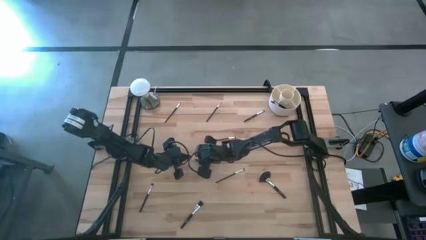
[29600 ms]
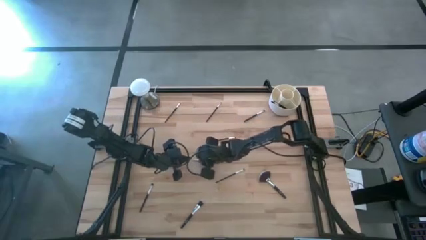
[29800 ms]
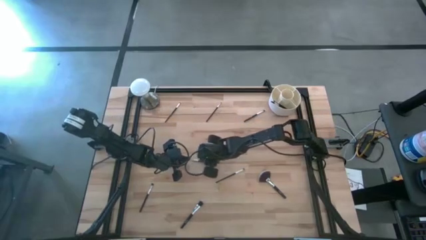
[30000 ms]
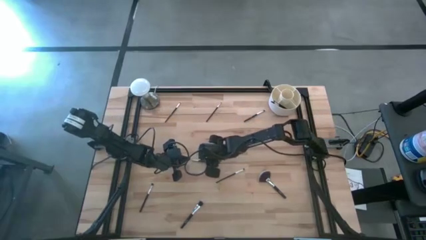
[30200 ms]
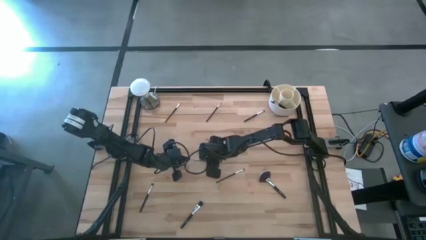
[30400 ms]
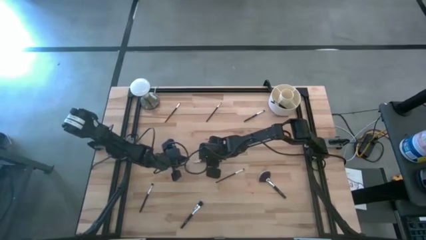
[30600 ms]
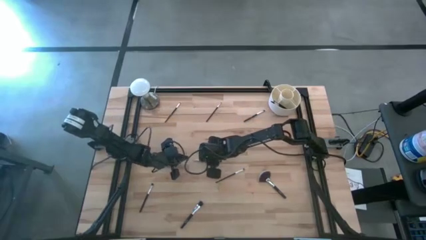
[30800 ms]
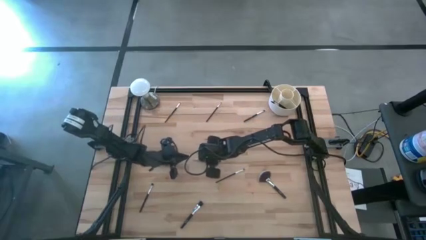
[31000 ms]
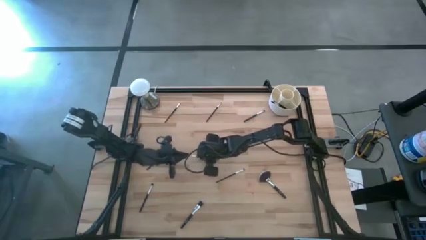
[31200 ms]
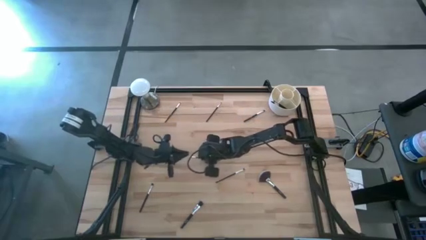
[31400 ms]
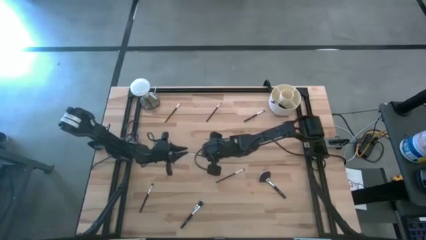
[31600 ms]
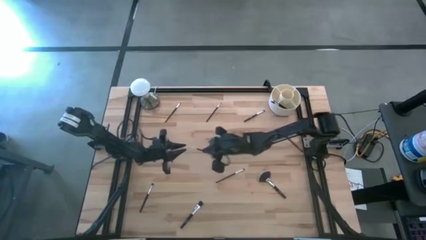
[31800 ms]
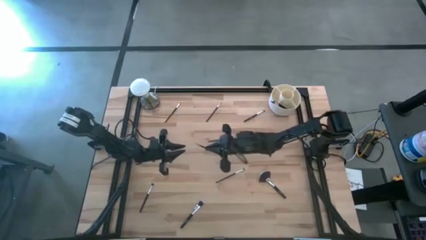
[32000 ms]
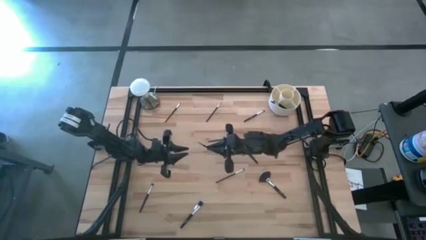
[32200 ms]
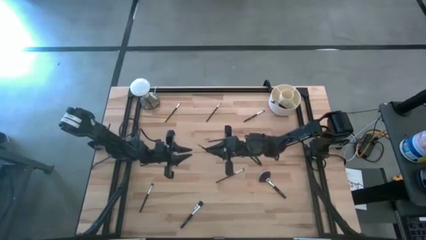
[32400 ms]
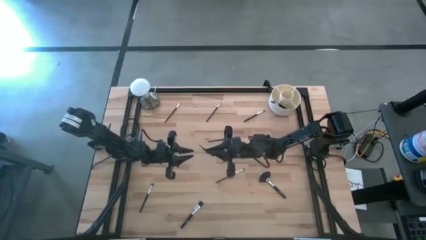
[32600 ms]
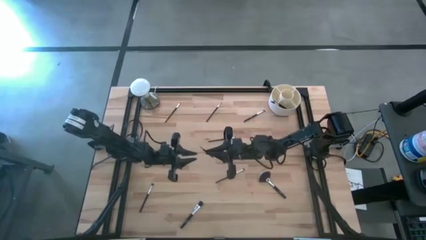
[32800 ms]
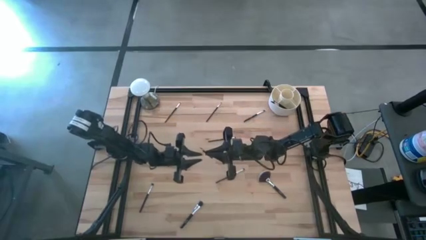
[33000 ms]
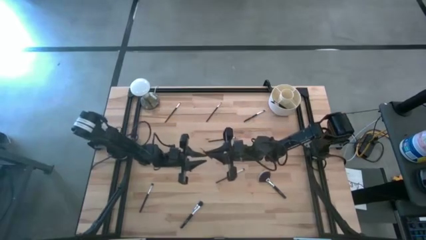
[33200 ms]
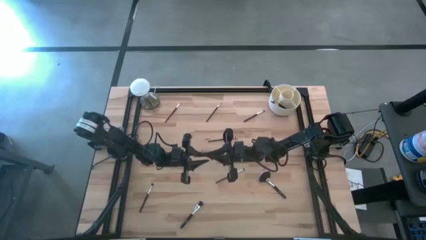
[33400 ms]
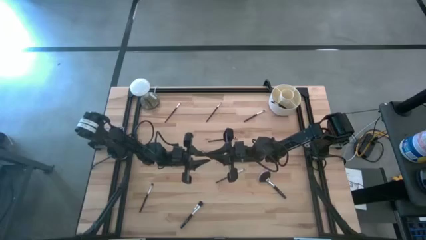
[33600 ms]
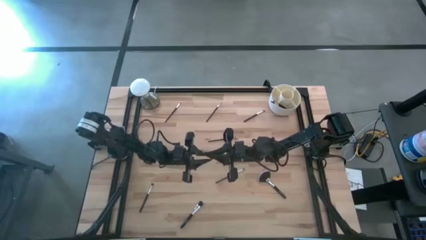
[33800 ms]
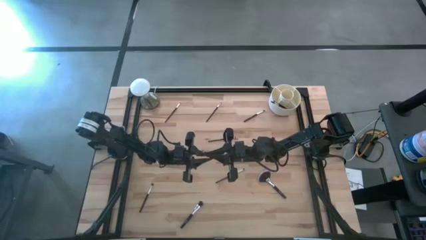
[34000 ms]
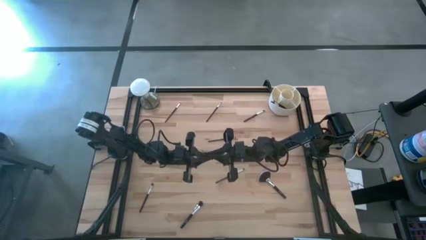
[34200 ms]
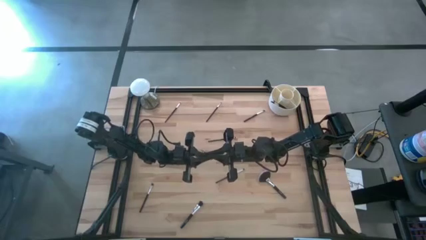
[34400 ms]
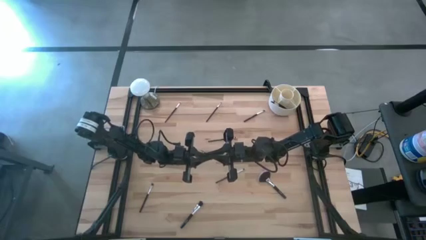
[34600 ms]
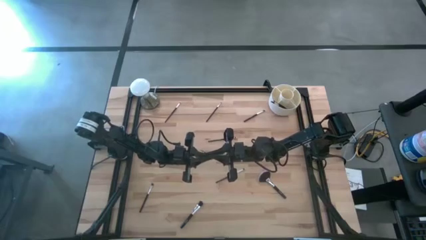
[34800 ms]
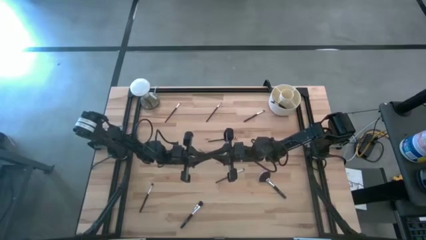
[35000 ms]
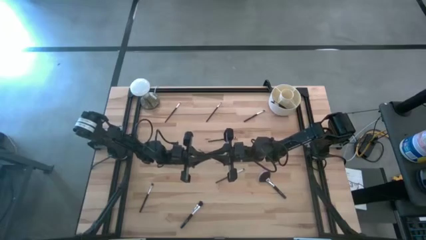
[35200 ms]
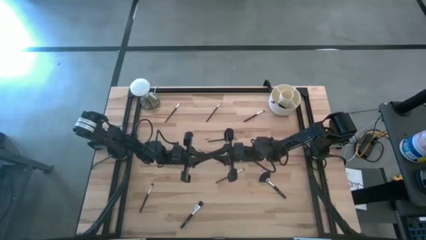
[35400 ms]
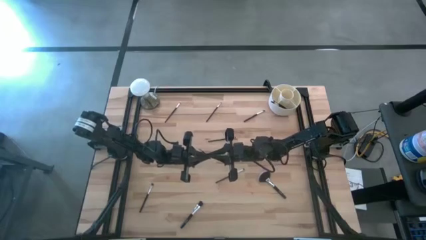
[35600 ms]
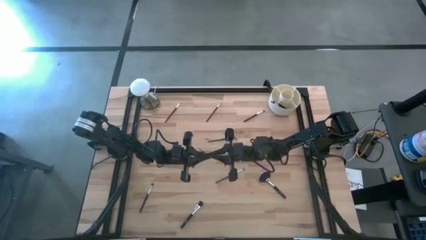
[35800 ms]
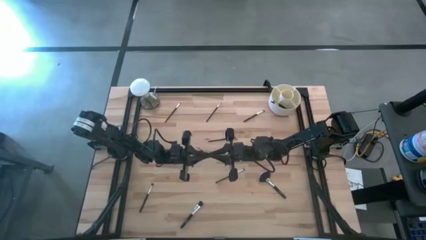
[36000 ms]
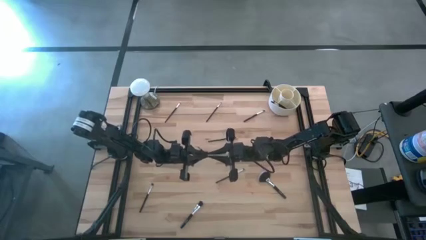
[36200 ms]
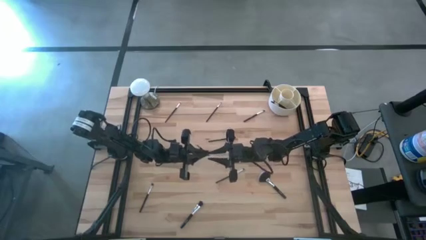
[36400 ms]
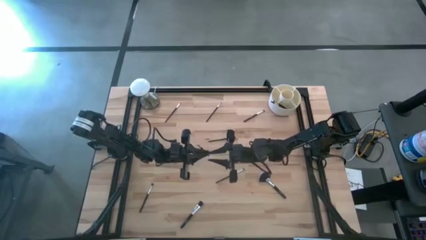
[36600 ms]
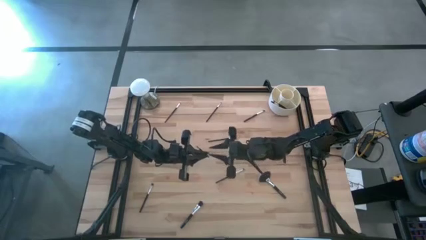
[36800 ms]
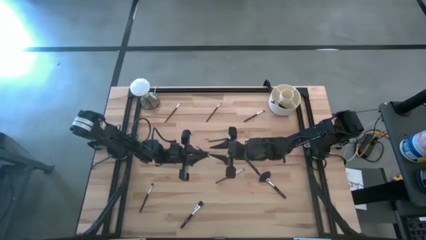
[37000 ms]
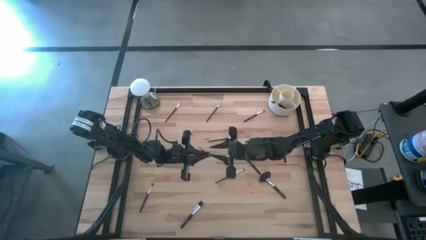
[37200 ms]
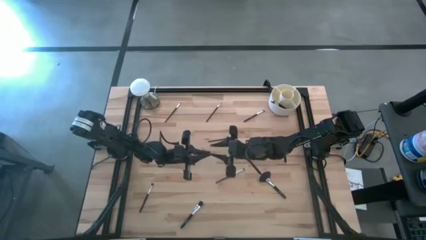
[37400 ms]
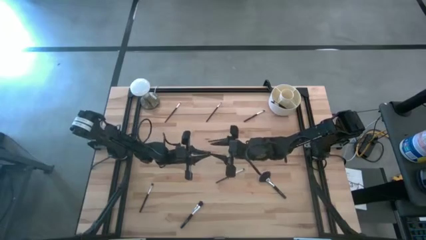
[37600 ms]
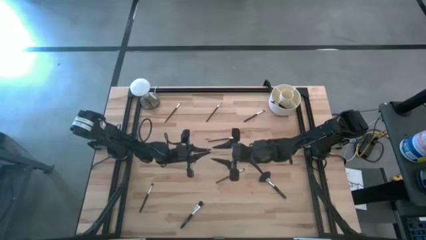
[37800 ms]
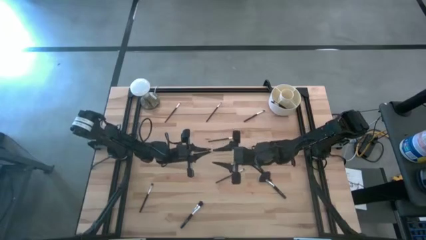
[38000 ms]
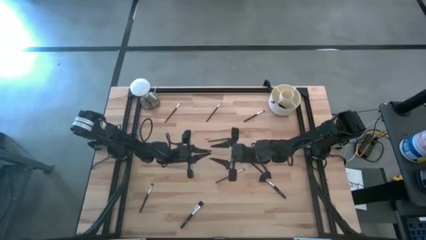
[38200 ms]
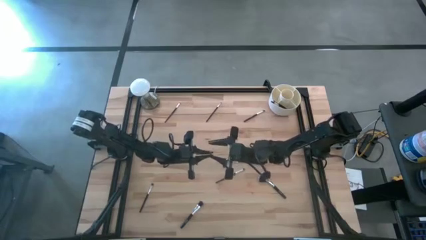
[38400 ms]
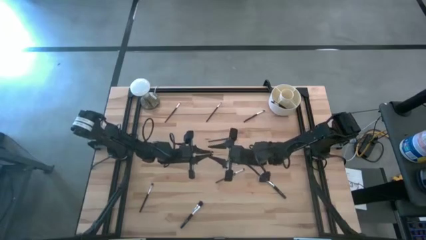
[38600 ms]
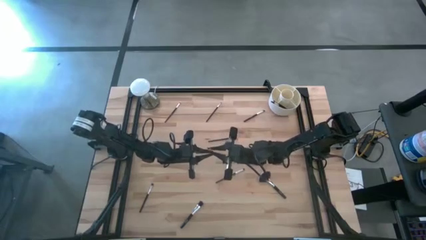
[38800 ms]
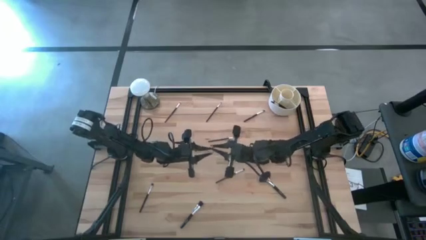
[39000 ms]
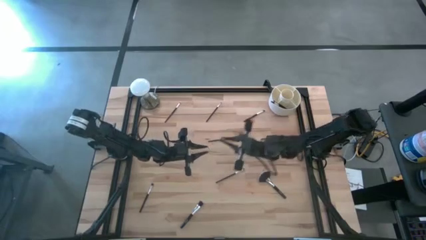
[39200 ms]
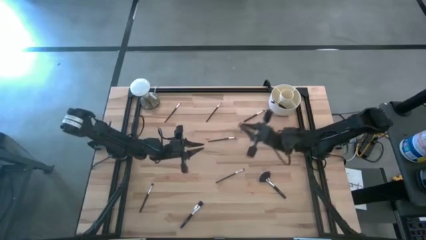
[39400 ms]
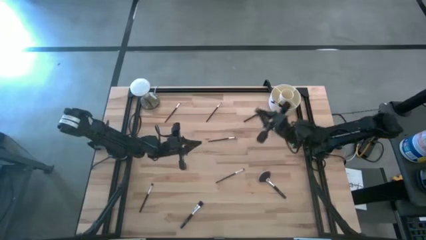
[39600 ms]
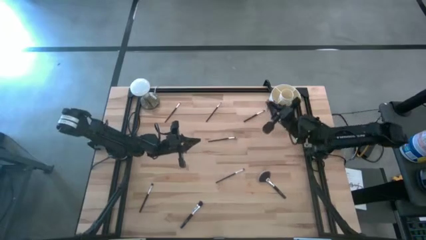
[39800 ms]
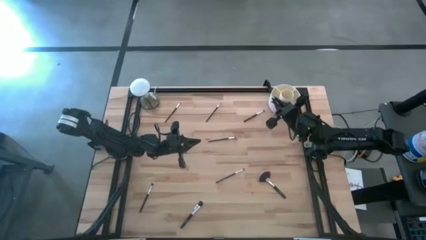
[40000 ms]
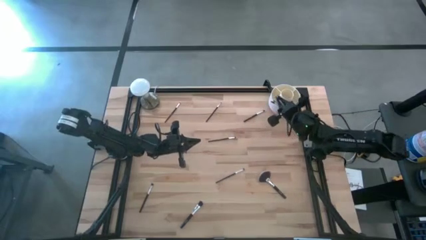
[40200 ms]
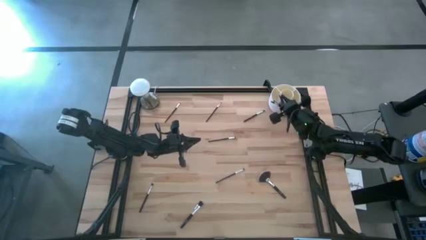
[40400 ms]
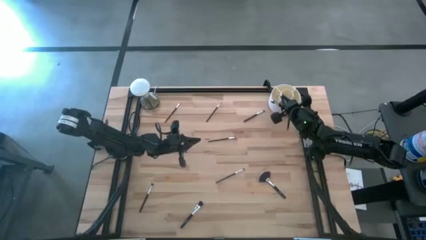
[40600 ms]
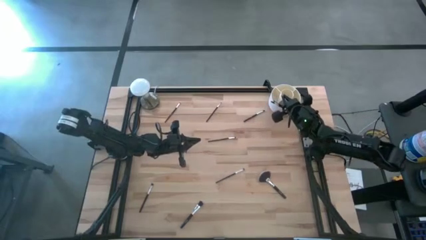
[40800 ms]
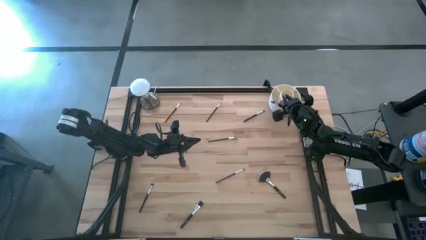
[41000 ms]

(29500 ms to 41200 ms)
Task: Put items in baskets/containers
Put the brown liner brush into the white organizer

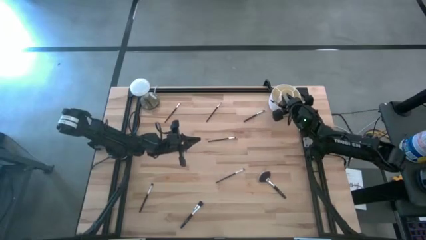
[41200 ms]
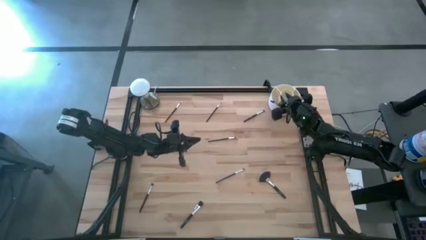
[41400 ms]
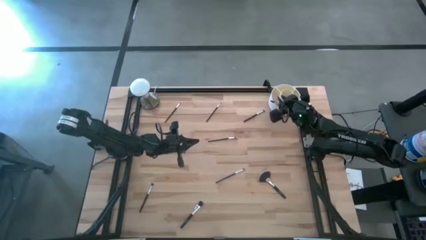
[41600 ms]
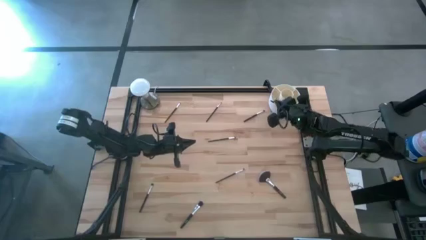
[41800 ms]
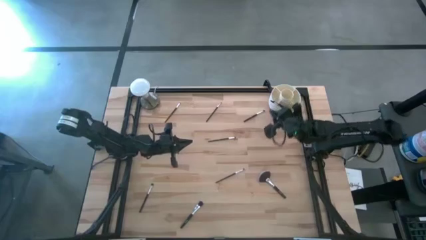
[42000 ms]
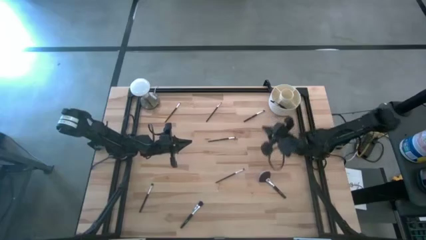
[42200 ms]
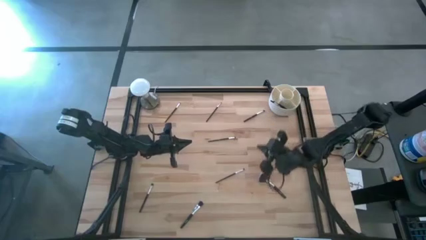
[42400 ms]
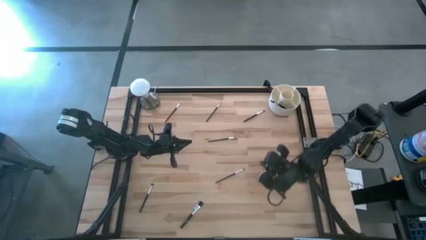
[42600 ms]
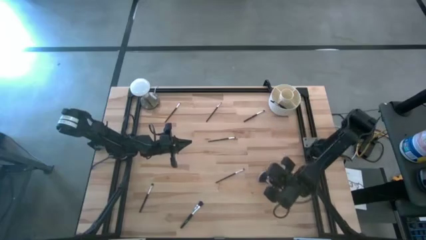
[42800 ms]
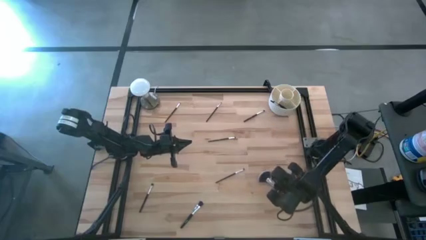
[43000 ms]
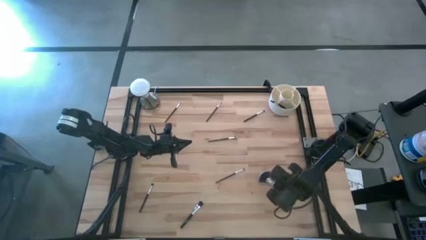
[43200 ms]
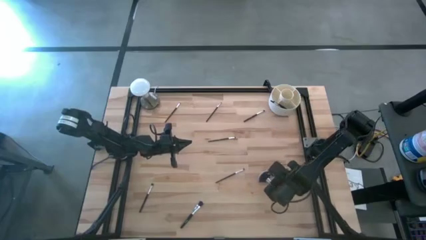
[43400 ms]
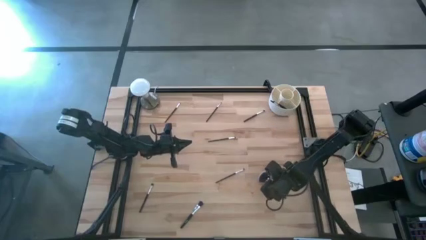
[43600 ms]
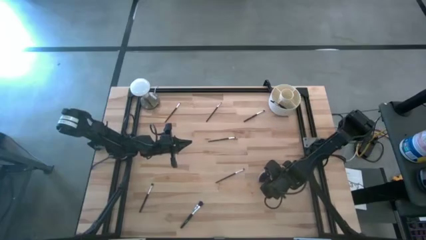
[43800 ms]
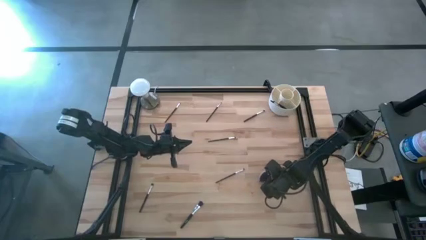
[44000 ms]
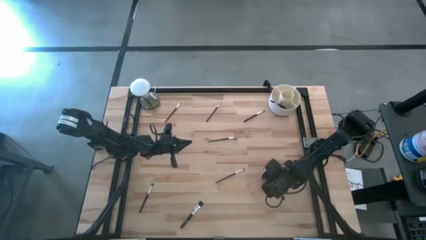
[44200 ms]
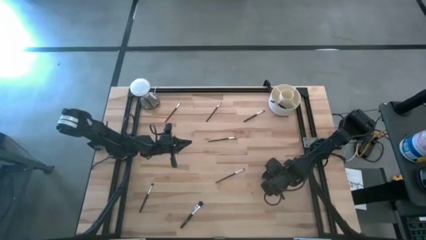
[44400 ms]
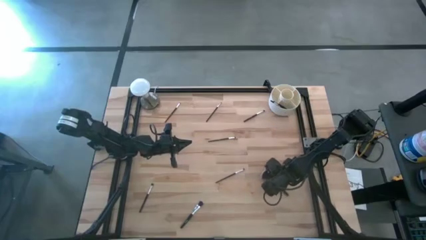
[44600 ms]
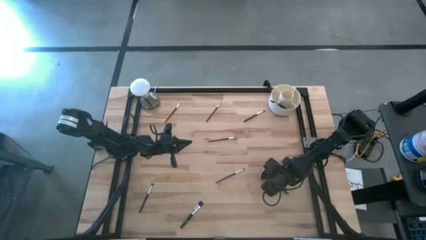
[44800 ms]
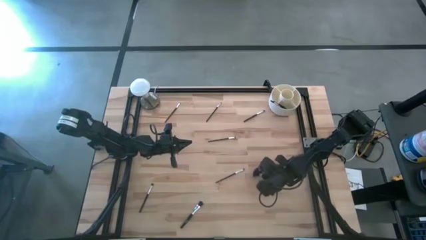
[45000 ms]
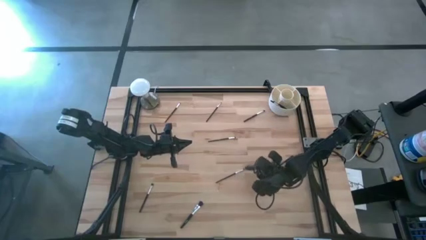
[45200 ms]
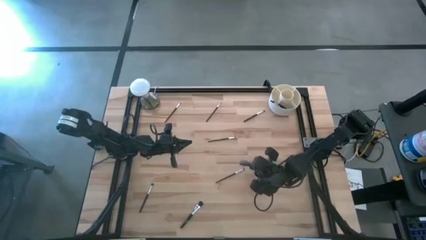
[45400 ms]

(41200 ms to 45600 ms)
Put the black highlighter brush into the white organizer
